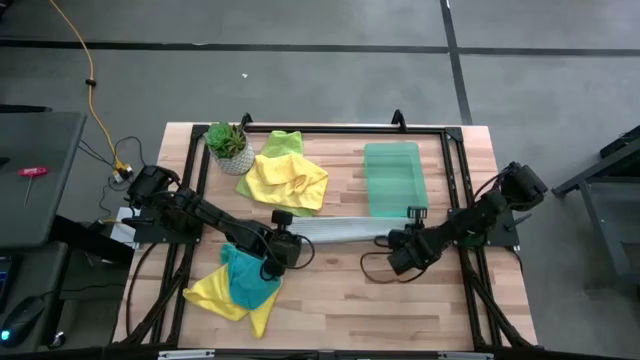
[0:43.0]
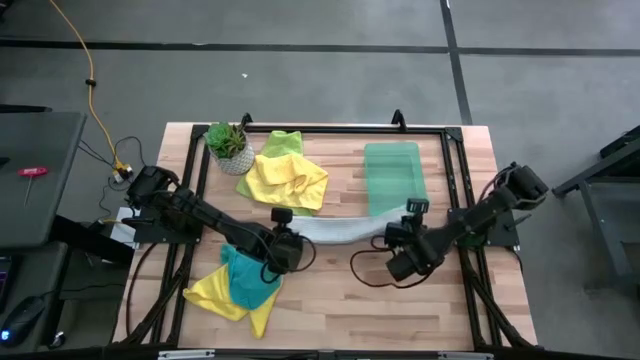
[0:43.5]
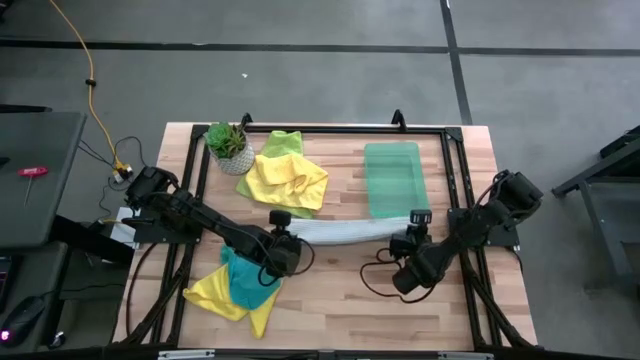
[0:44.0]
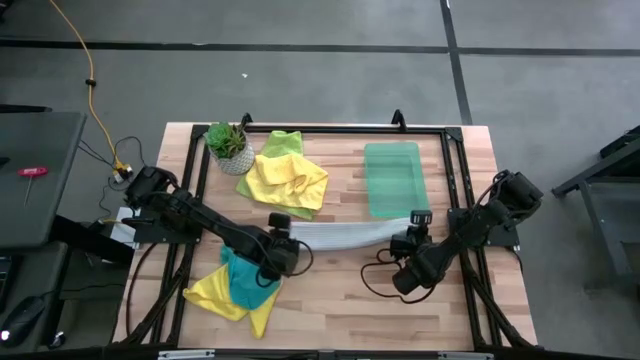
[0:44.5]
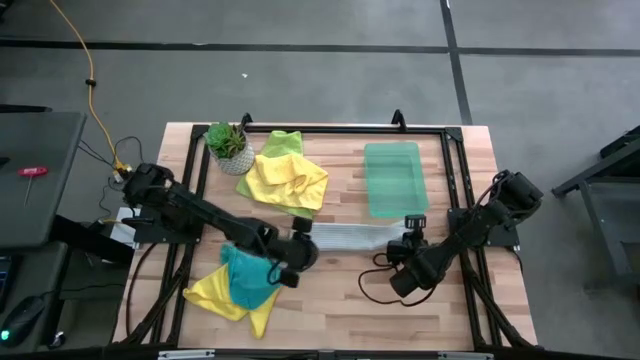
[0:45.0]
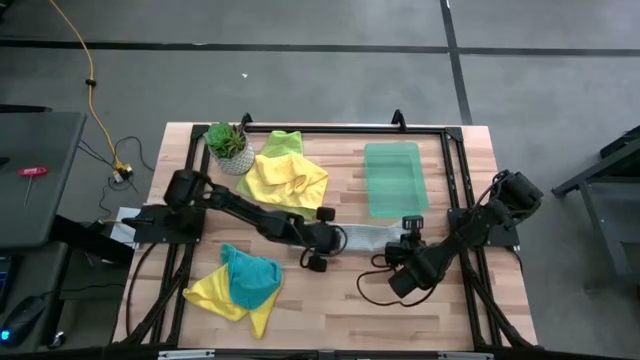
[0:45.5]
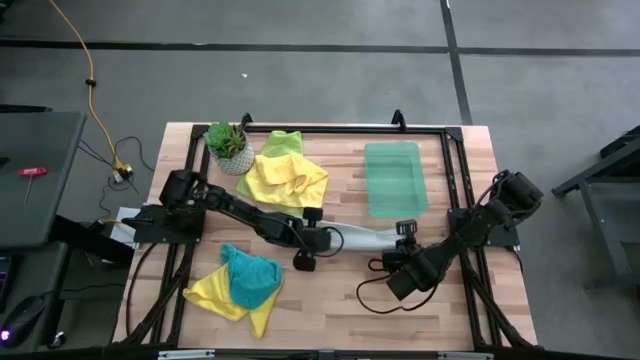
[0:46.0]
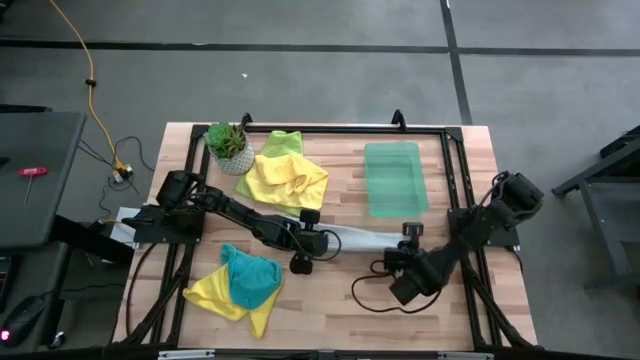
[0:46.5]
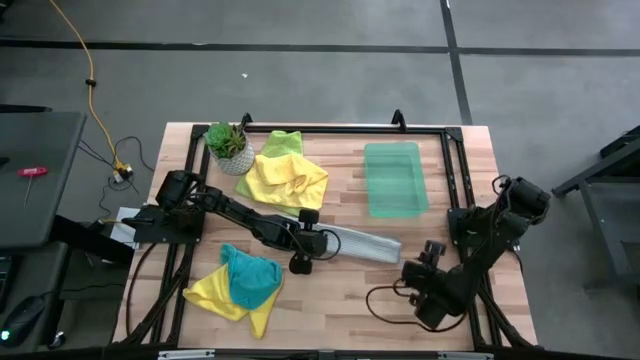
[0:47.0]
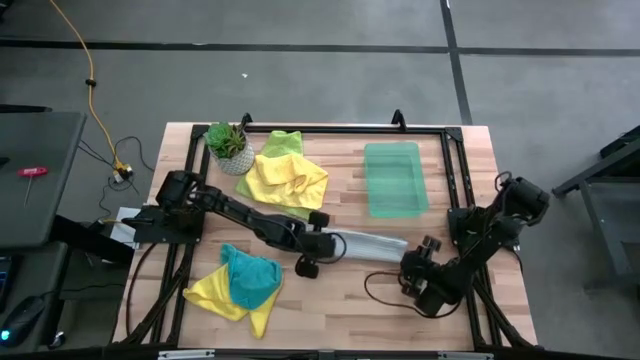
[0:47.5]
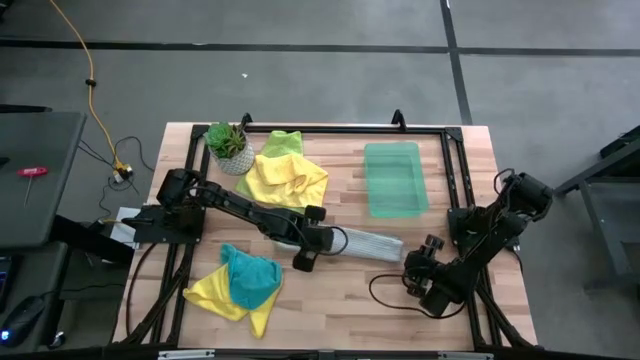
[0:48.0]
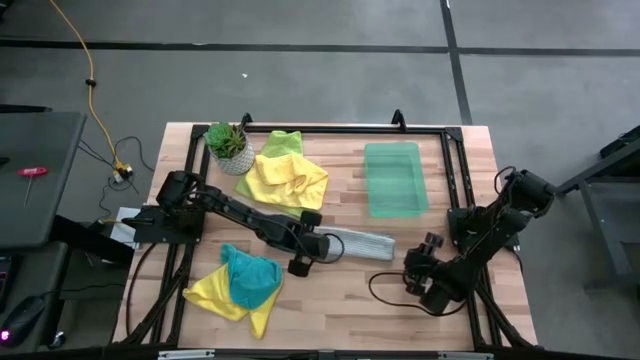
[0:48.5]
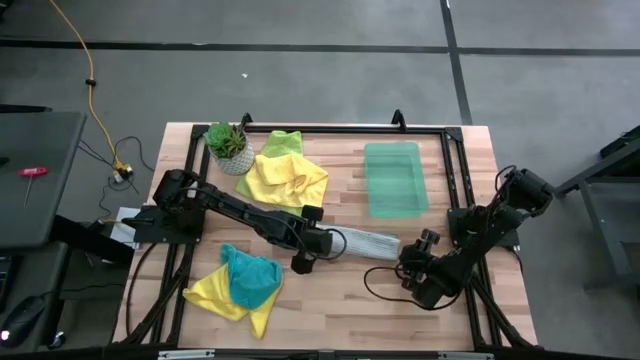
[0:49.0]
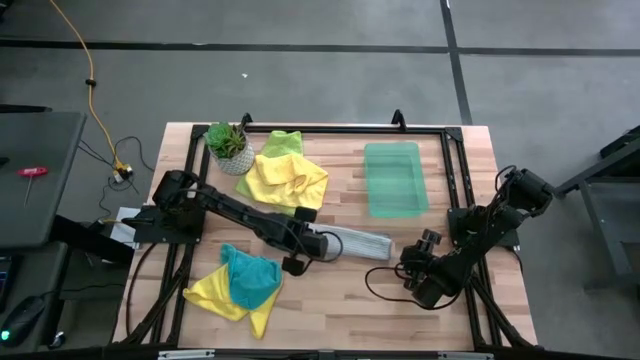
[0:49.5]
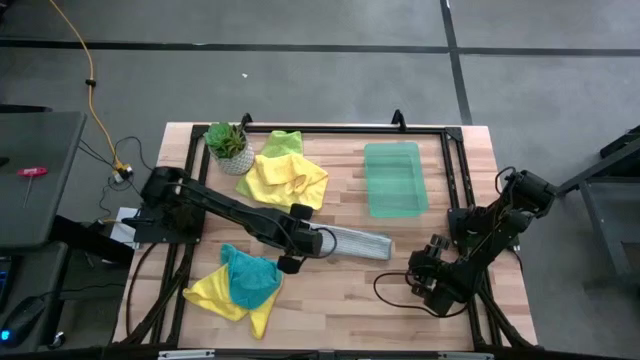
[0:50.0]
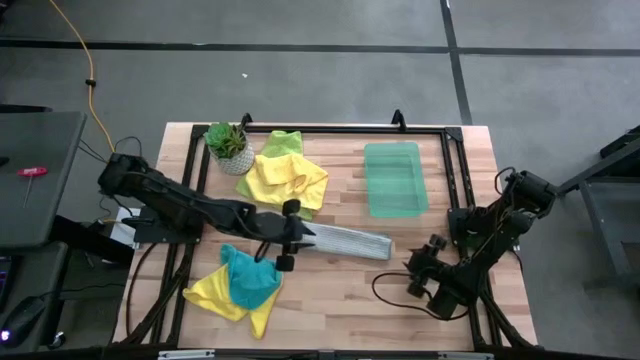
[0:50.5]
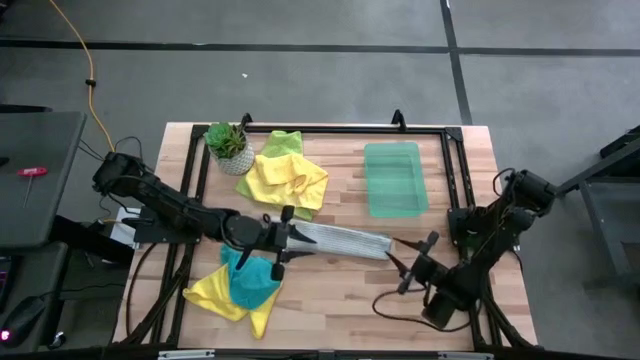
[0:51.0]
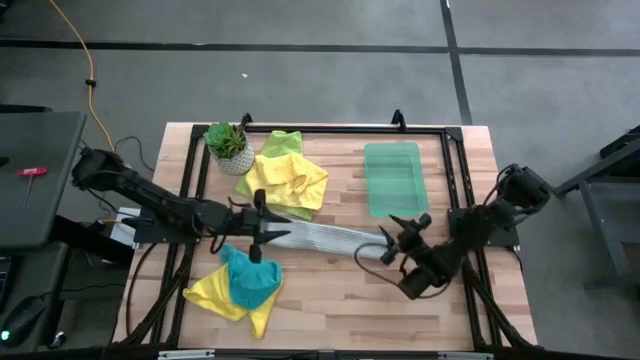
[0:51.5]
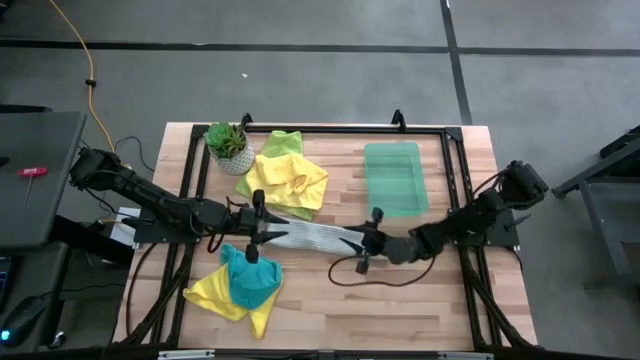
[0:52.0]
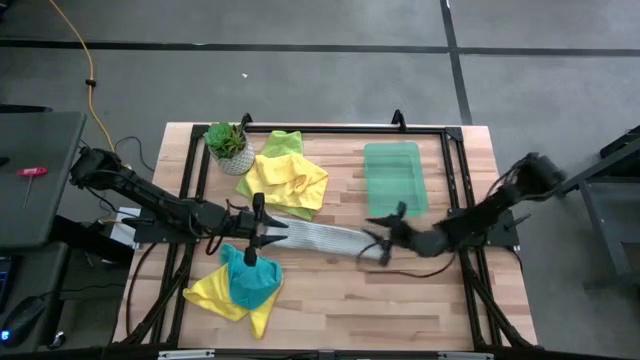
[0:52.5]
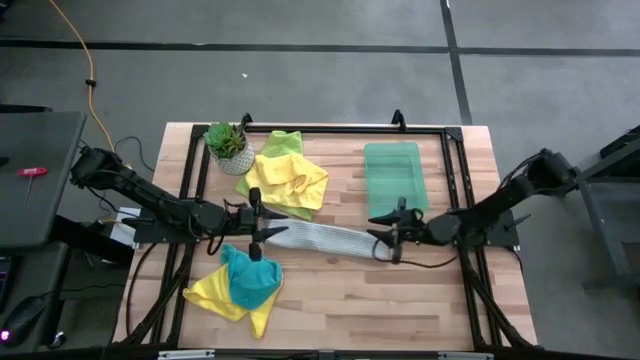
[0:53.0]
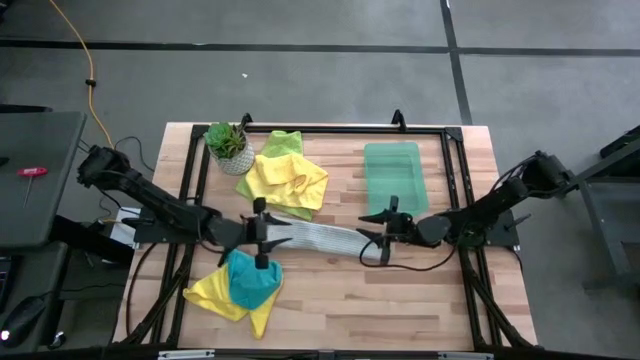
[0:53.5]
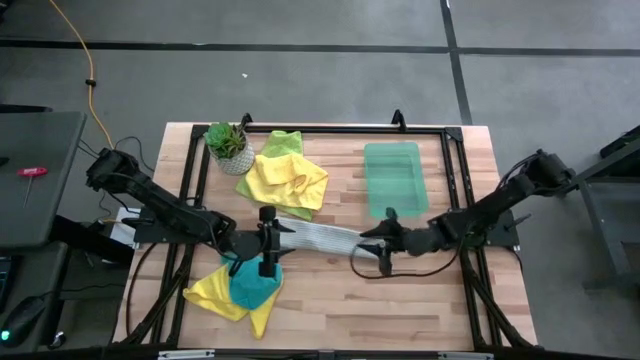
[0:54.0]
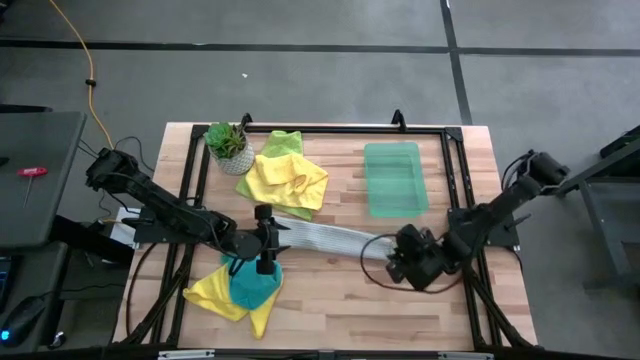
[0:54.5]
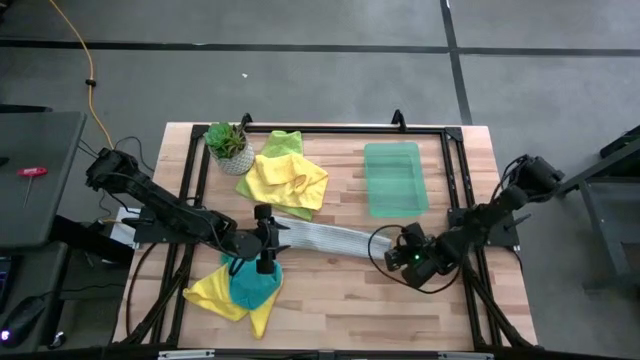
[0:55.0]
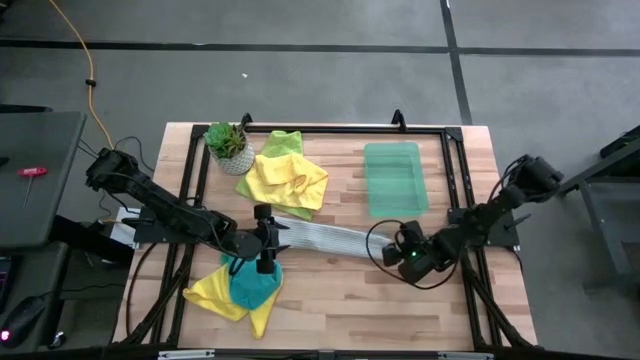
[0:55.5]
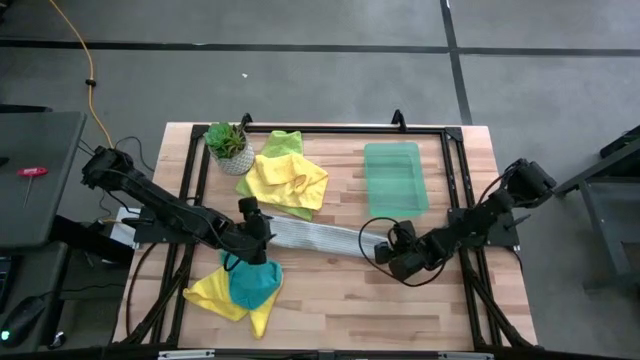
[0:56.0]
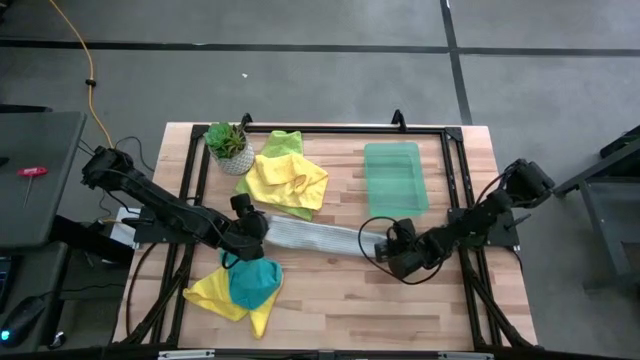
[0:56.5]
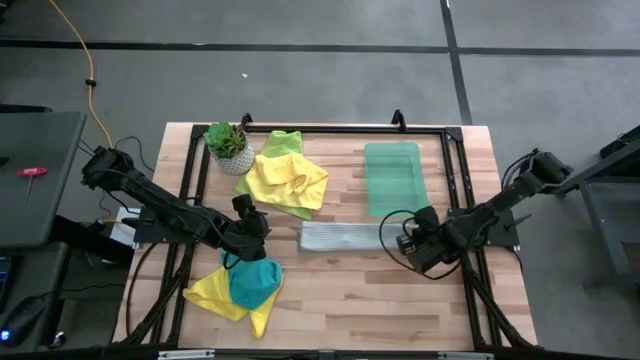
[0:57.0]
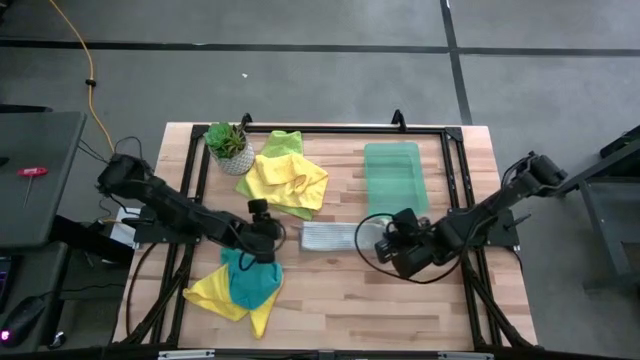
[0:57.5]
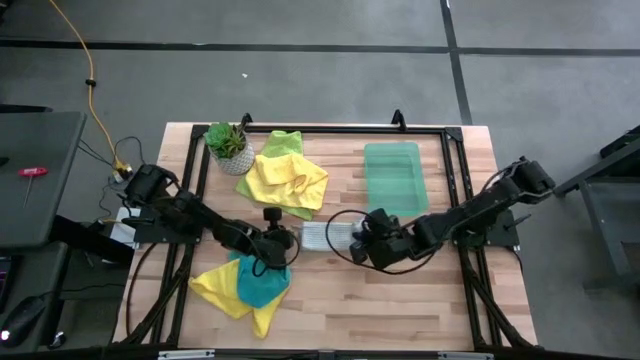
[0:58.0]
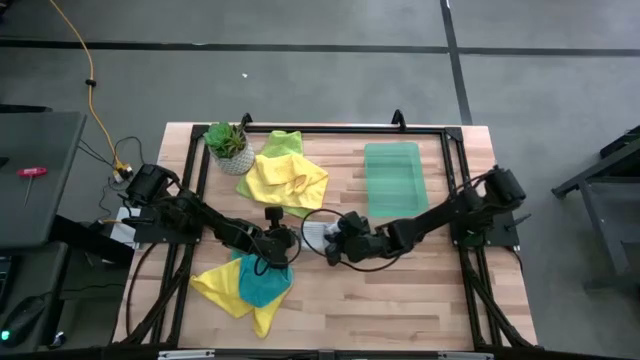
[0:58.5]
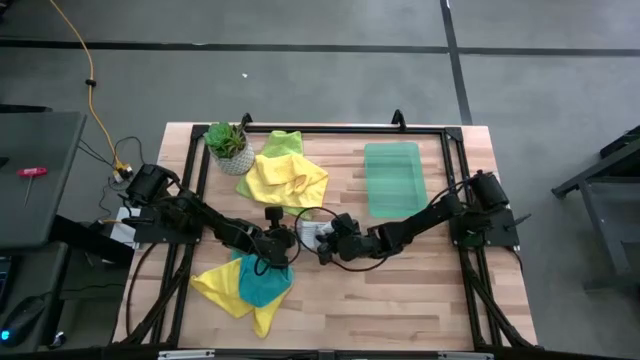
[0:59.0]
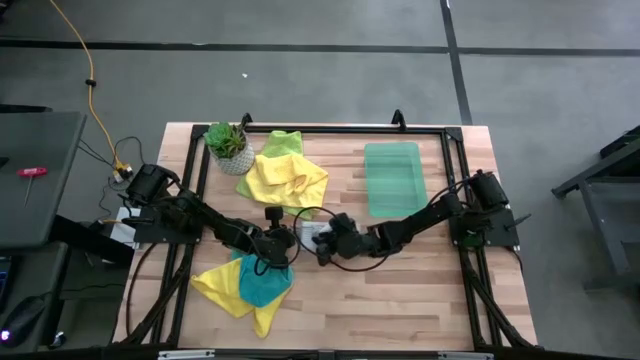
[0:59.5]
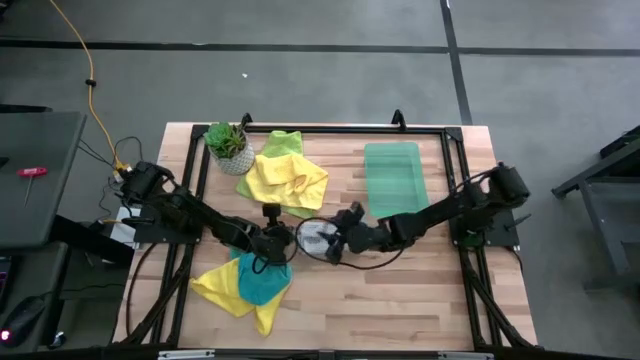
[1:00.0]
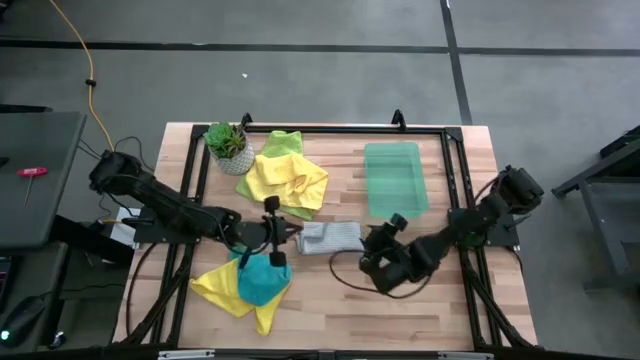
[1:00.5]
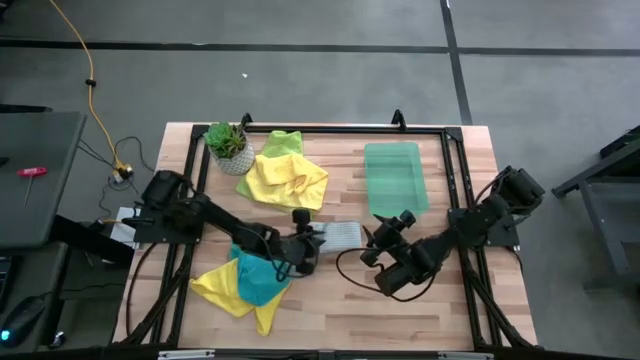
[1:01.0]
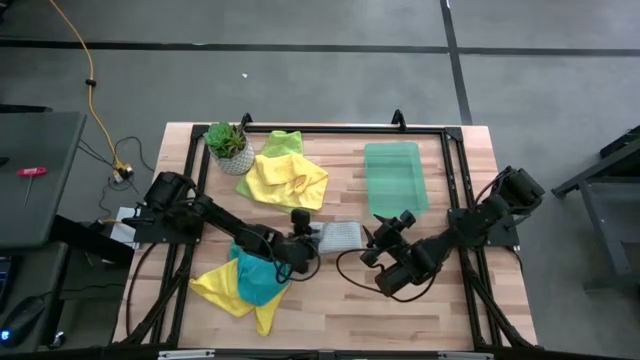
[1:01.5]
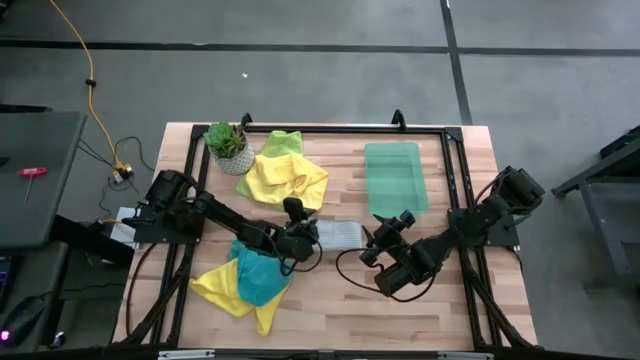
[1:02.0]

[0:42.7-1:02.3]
Task: Fold microfiber towels
Fold the gray microfiber cloth
